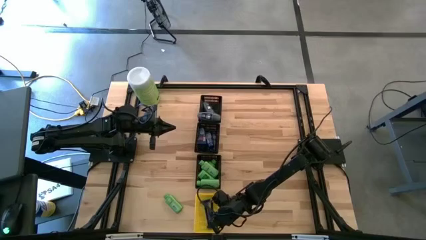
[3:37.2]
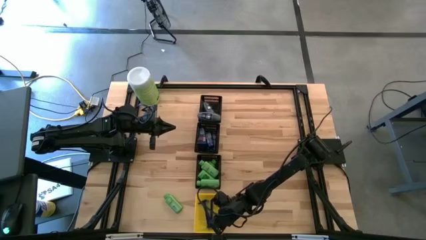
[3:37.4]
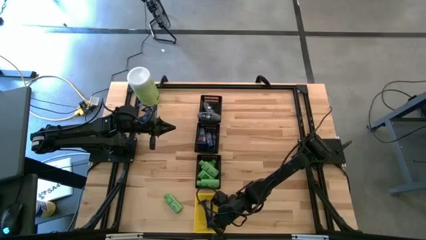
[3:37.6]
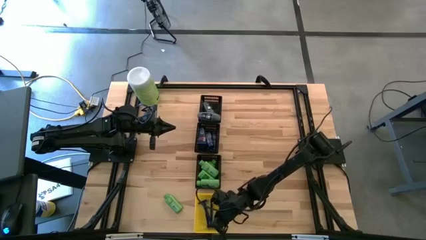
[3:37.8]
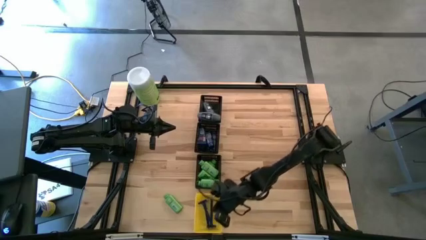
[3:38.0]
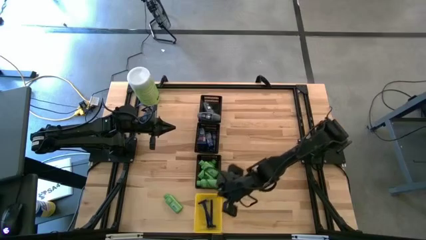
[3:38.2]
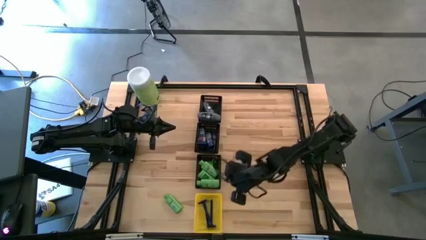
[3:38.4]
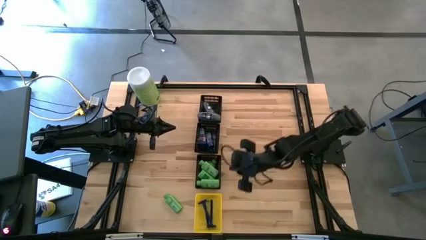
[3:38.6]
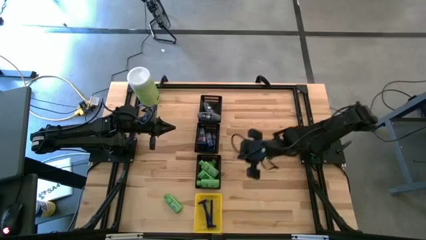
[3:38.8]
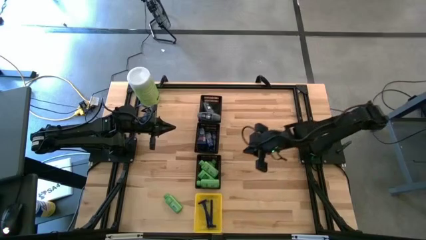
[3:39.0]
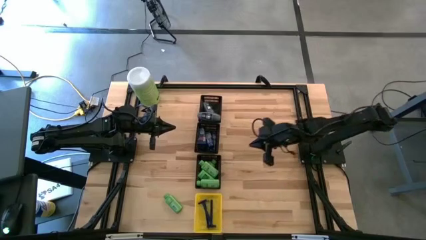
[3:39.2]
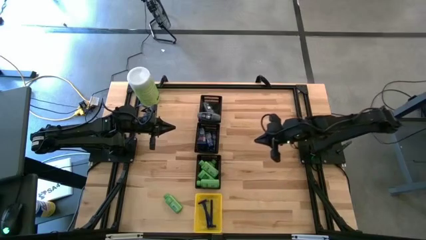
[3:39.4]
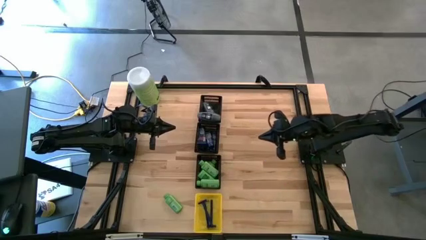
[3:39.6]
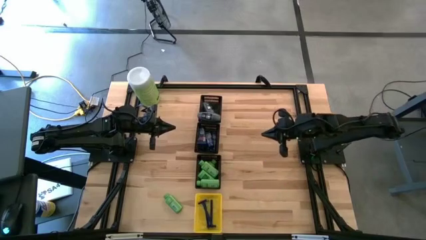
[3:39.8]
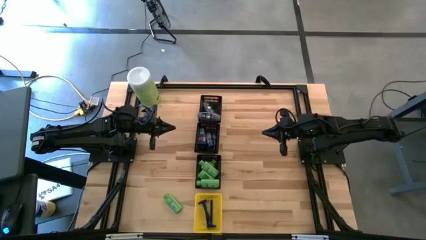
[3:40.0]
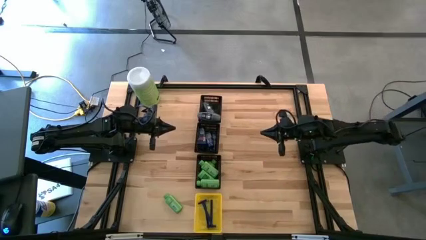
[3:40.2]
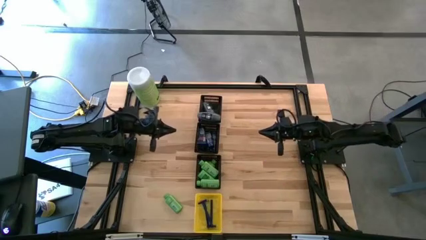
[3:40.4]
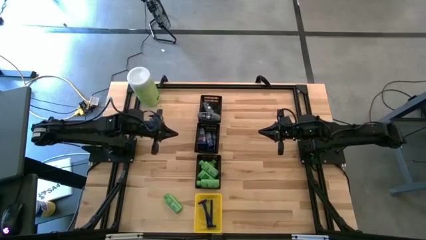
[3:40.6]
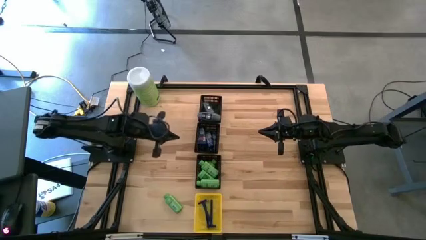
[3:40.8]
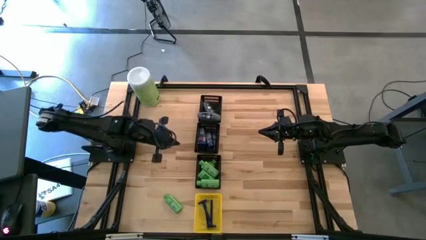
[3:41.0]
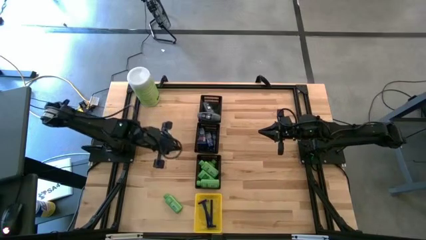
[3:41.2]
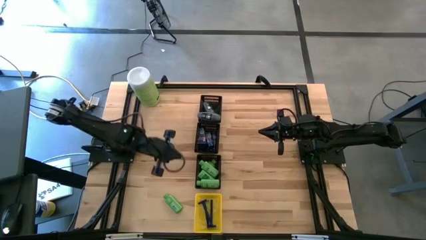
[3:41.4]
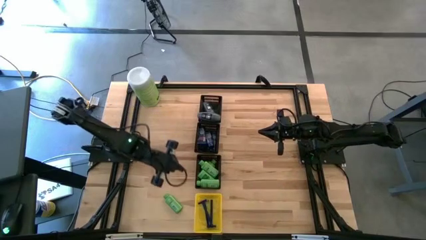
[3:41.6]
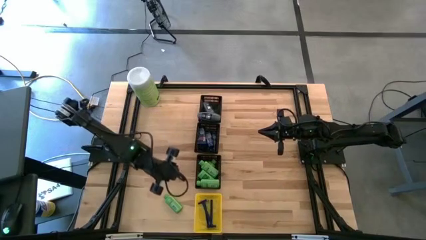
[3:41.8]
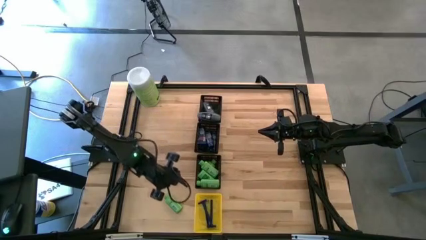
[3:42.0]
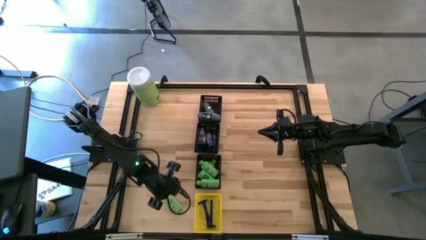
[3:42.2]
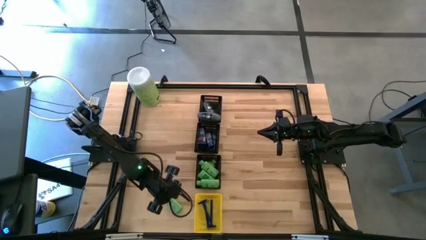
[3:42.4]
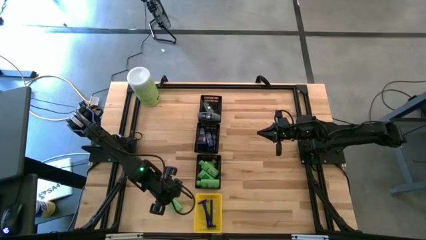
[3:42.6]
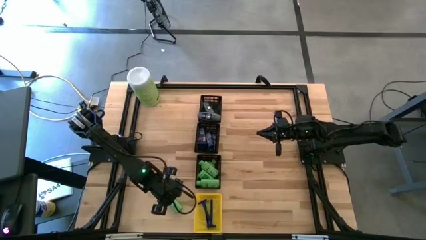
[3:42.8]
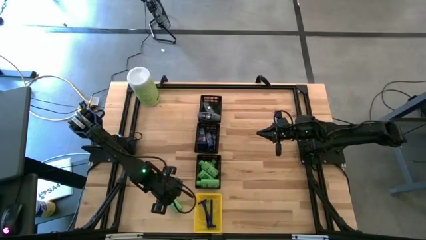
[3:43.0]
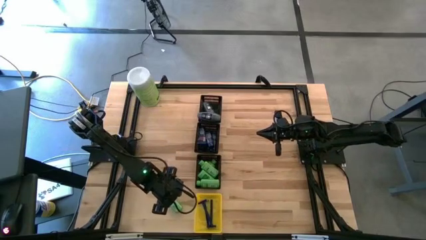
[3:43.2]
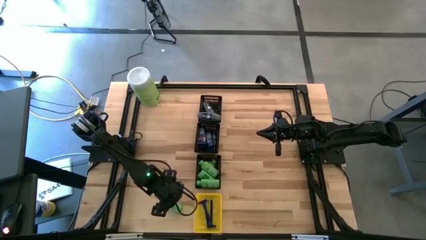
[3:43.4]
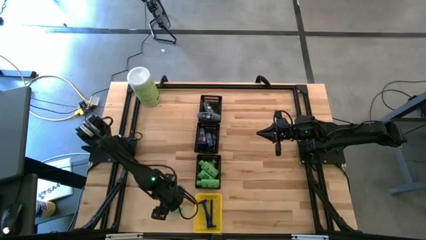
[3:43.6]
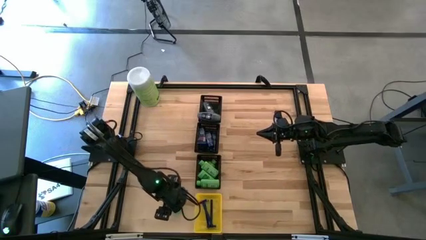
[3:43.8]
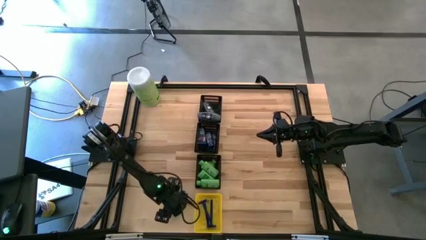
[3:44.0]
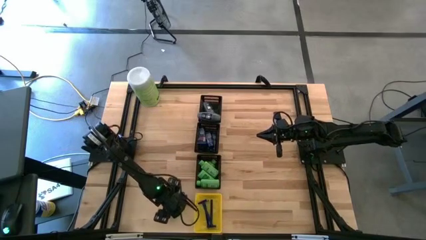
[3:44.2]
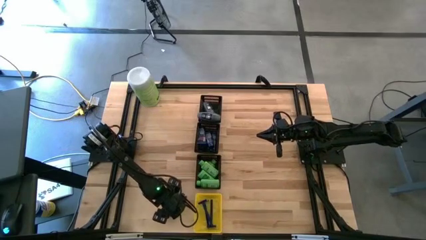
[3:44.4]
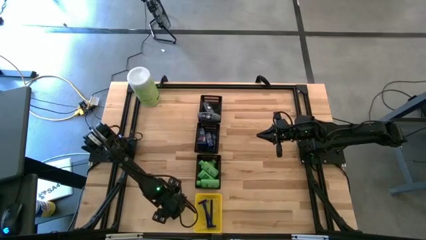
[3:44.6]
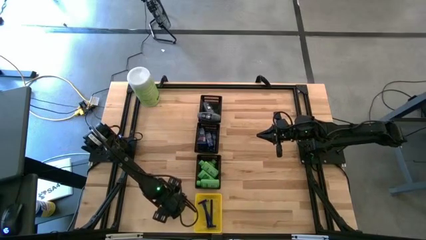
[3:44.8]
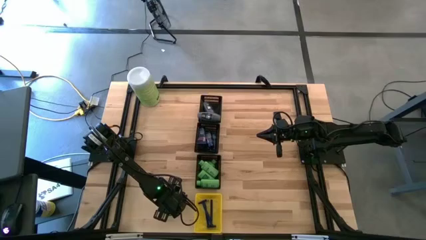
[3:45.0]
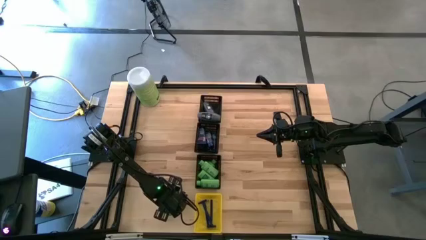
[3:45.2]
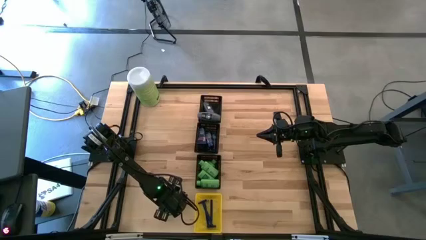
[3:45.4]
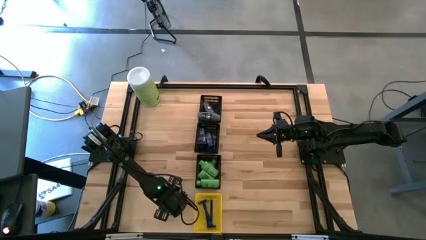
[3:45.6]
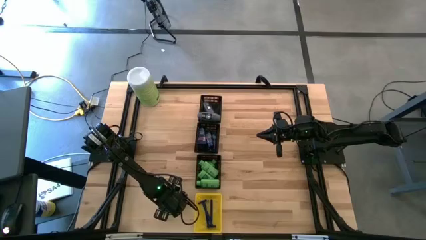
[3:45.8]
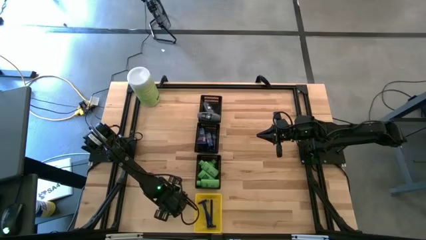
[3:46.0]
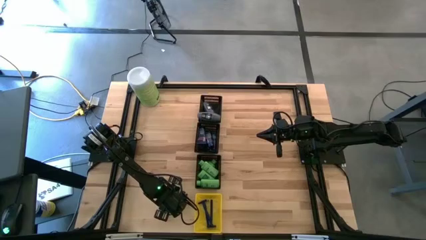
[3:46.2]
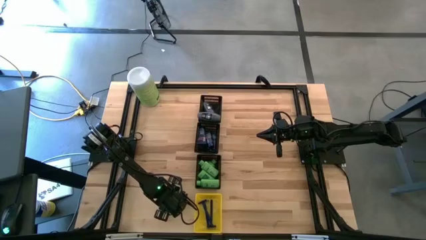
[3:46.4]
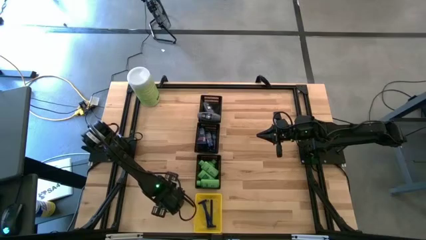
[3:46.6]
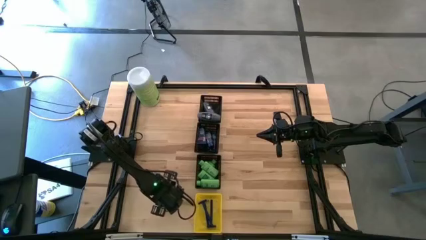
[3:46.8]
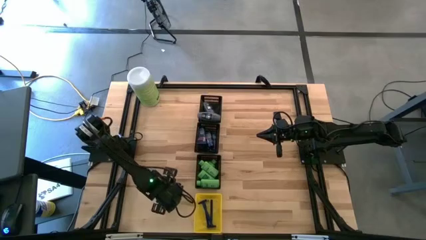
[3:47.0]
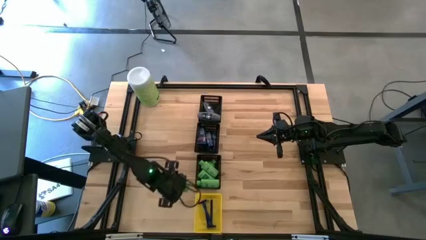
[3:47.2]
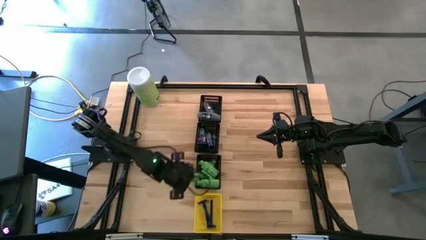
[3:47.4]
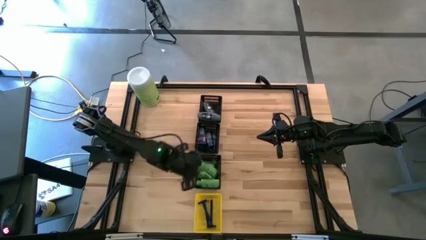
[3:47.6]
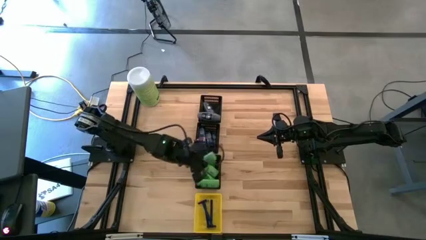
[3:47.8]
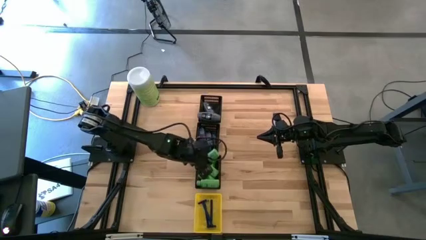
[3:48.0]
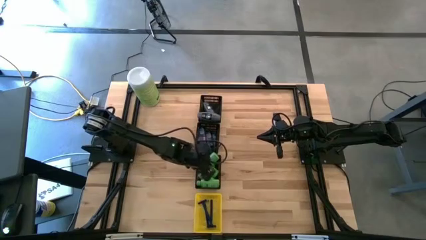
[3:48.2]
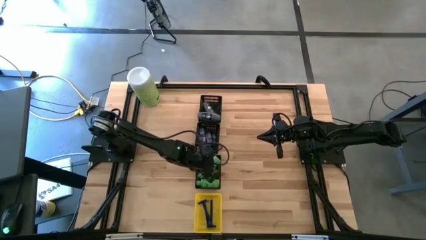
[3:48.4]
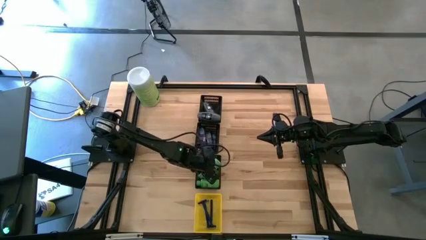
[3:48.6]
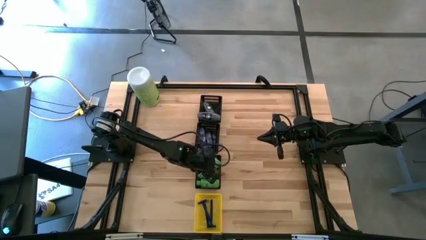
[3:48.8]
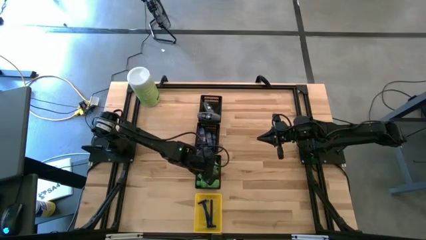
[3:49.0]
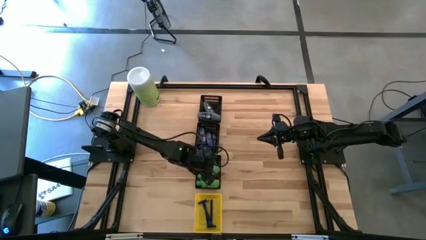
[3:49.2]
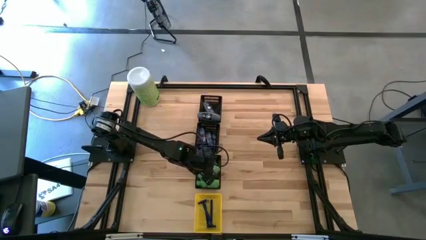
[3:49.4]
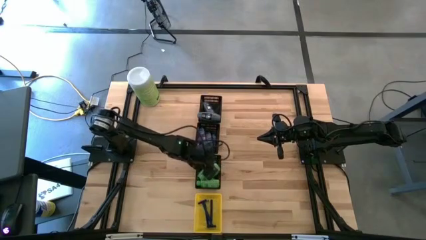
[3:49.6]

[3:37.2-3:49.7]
Task: Pick & Place Travel size toiletries
Put the green shampoo bottle into the bottom black bin

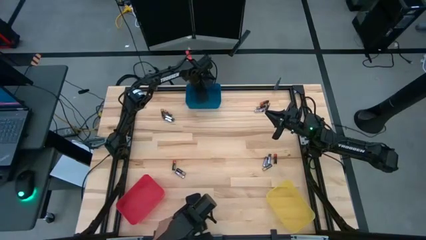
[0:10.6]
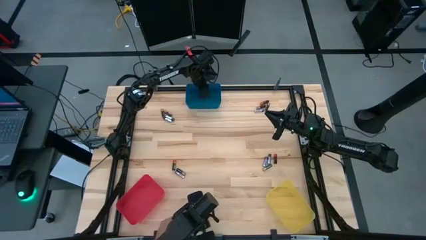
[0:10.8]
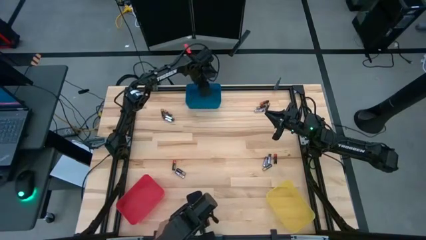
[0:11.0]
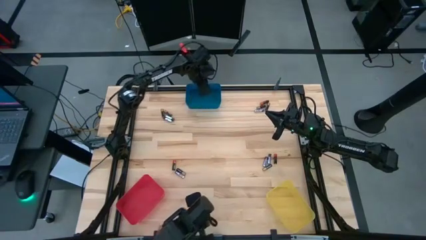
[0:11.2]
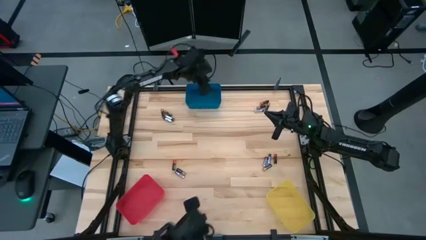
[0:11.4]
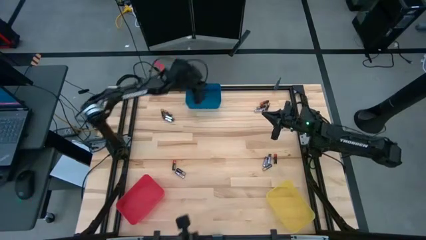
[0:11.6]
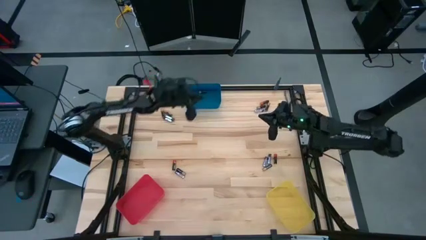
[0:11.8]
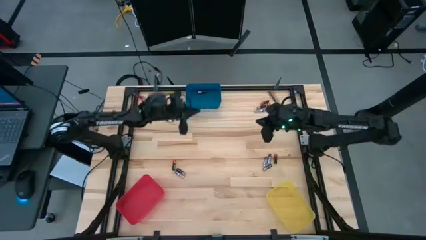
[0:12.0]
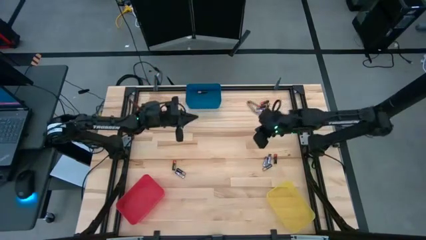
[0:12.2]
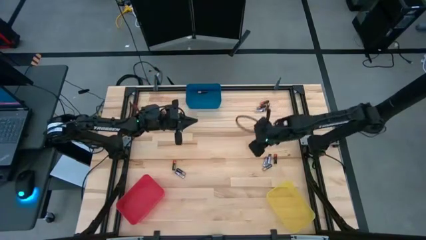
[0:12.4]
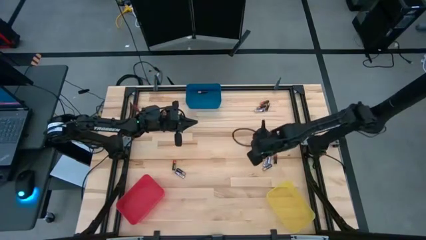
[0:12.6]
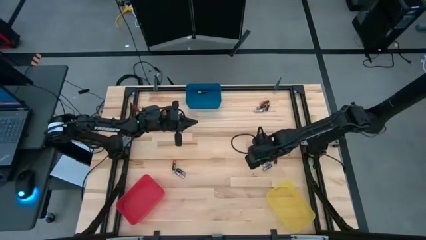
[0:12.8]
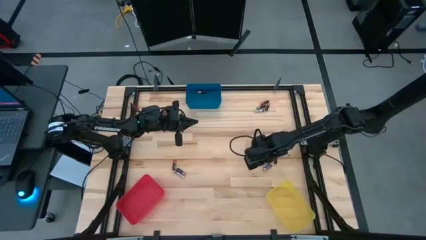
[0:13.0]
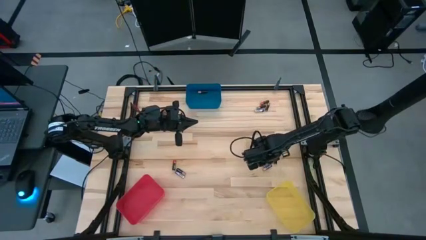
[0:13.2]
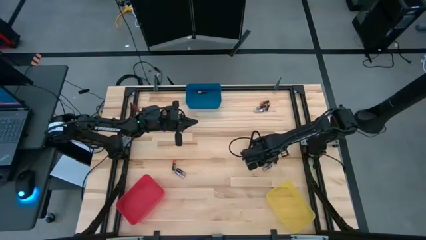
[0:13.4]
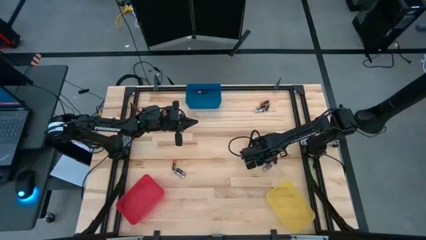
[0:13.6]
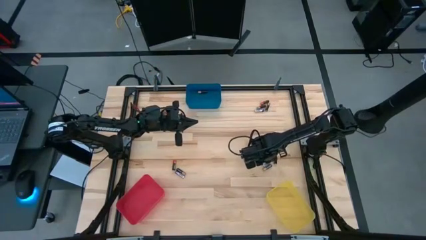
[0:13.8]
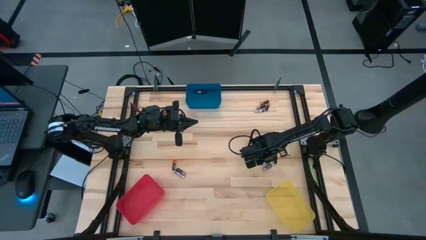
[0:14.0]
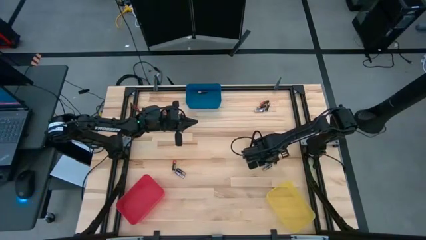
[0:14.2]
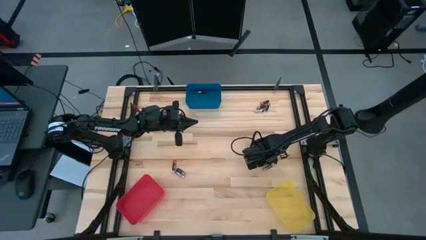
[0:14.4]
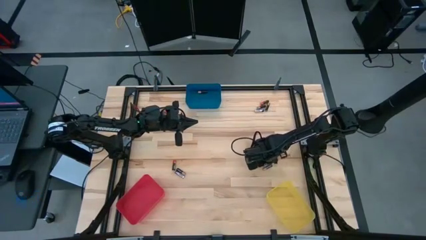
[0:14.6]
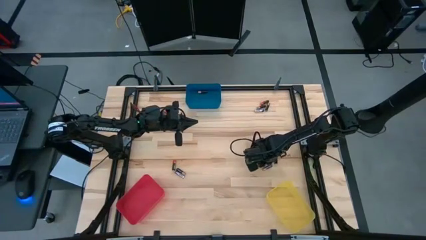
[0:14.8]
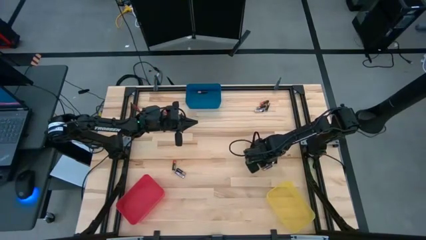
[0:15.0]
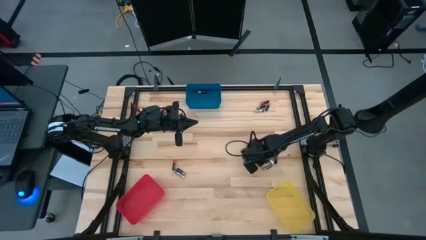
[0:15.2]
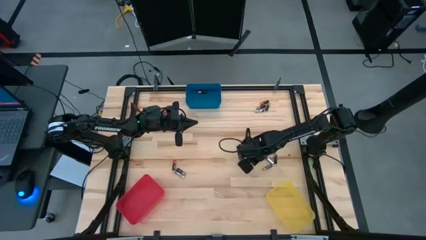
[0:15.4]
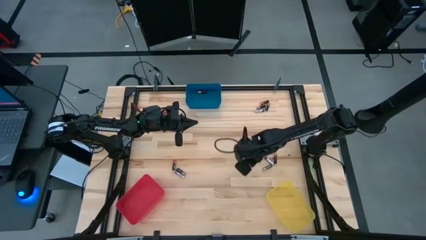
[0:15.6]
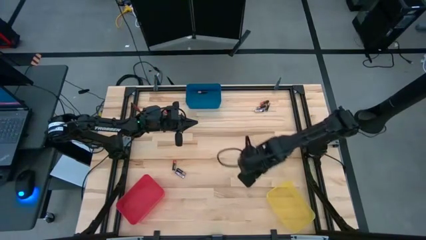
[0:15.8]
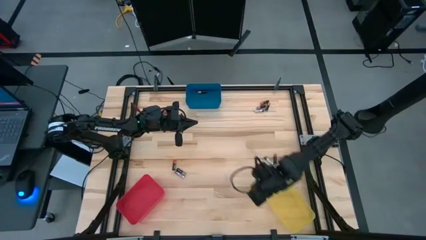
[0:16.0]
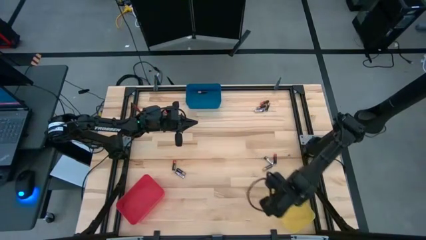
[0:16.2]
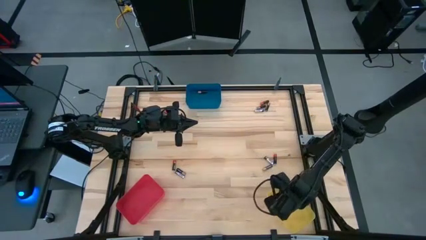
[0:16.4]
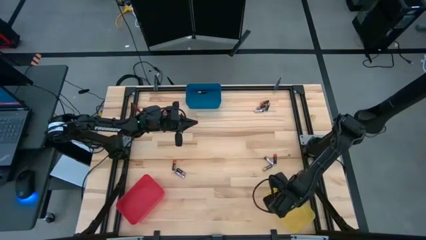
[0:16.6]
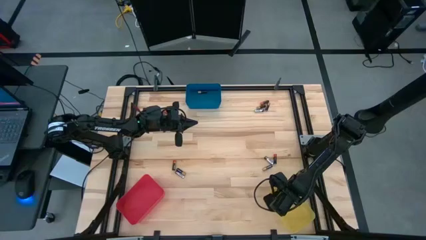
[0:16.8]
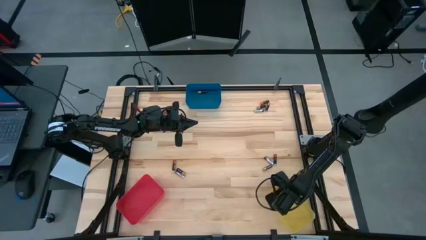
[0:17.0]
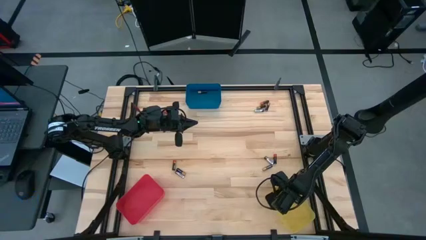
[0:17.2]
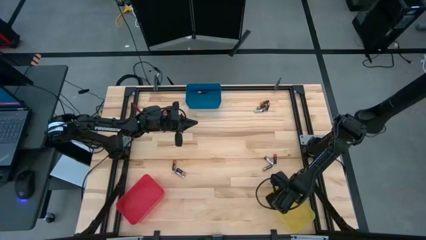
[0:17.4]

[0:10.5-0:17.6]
Task: Sort batteries
Put the silver battery into the yellow bin
